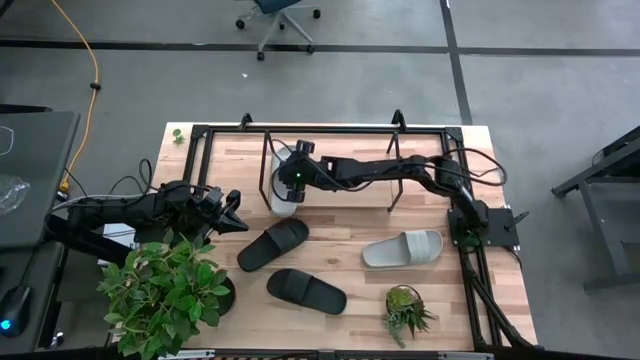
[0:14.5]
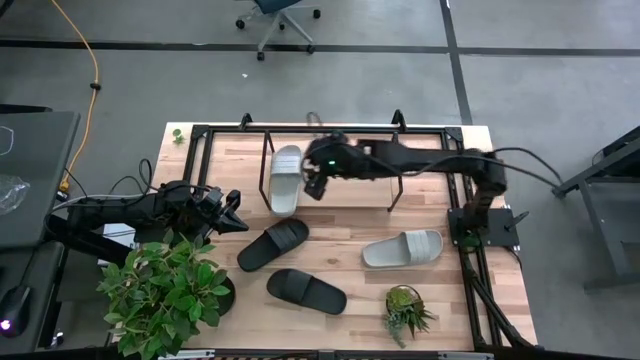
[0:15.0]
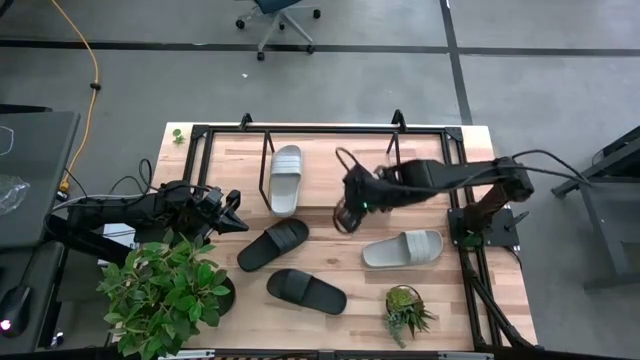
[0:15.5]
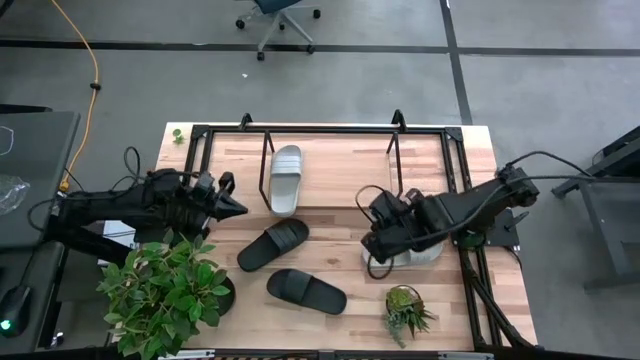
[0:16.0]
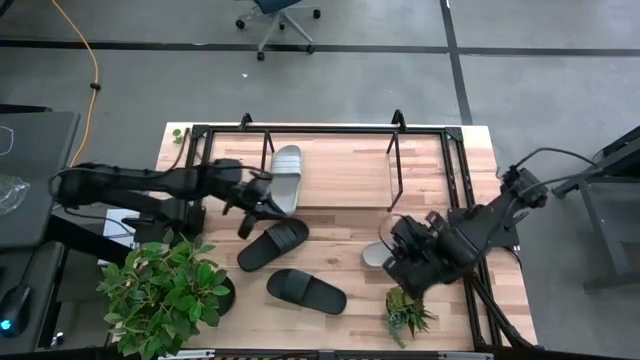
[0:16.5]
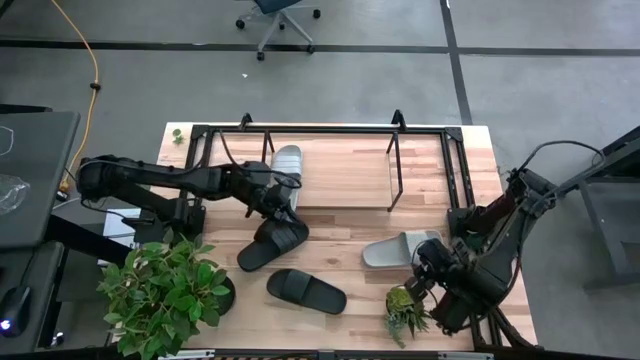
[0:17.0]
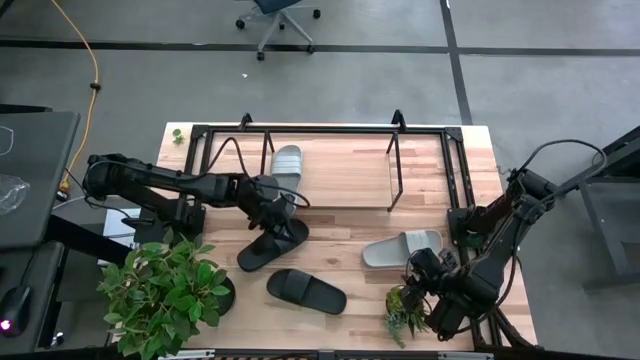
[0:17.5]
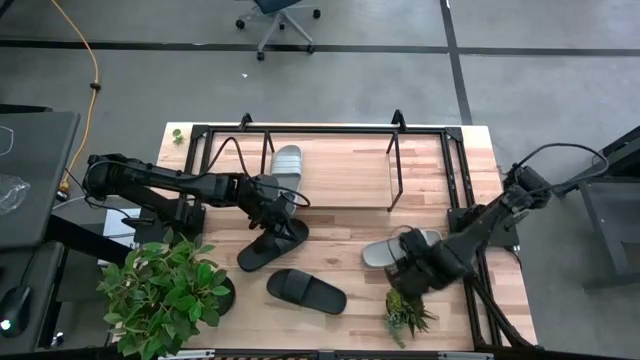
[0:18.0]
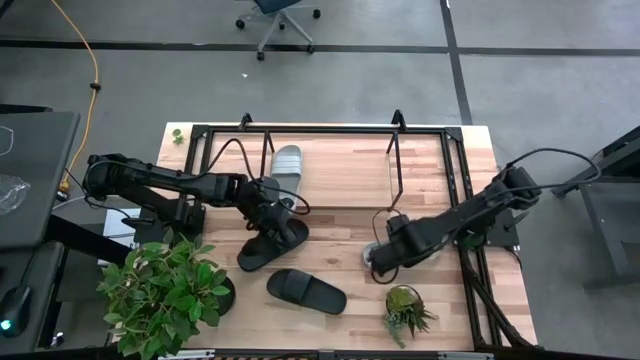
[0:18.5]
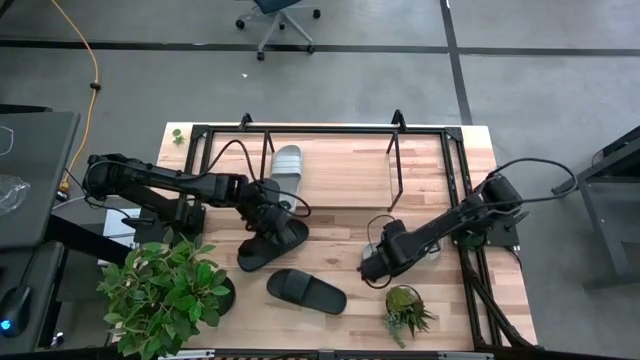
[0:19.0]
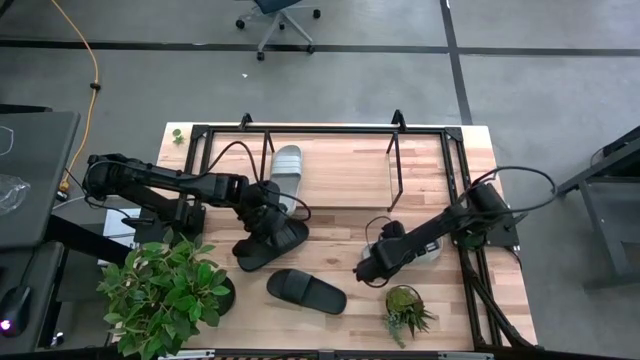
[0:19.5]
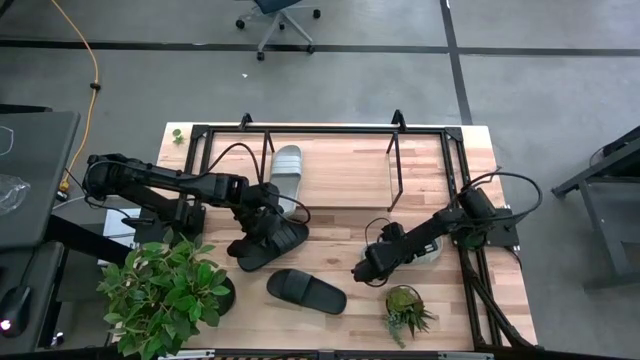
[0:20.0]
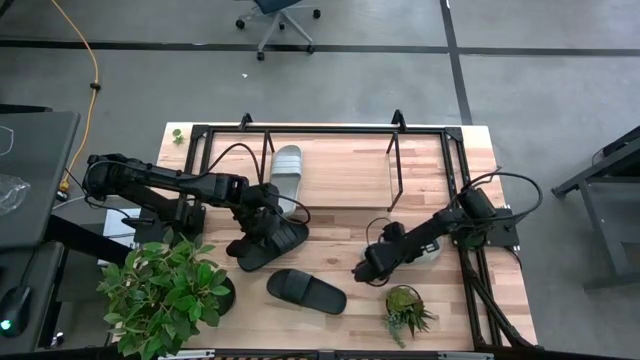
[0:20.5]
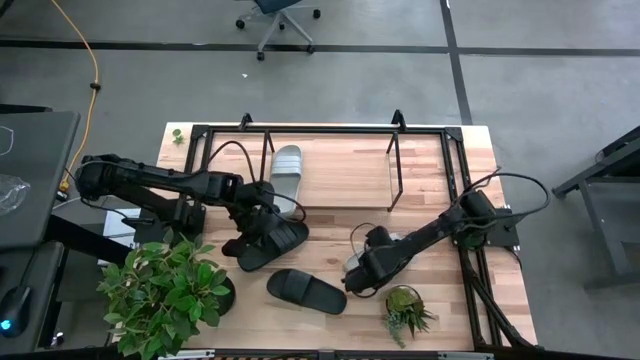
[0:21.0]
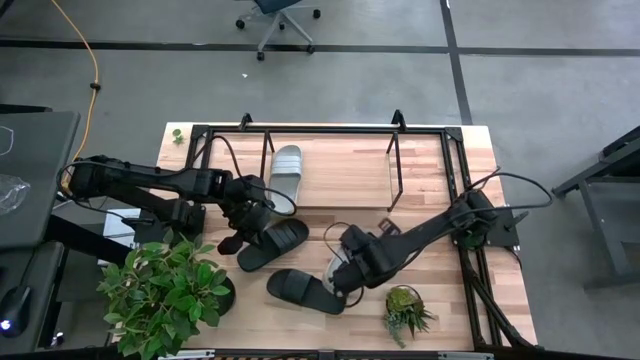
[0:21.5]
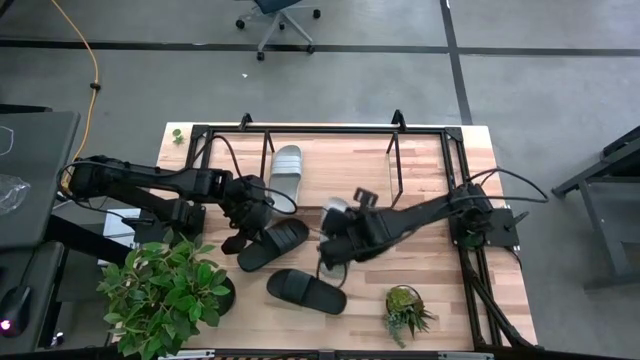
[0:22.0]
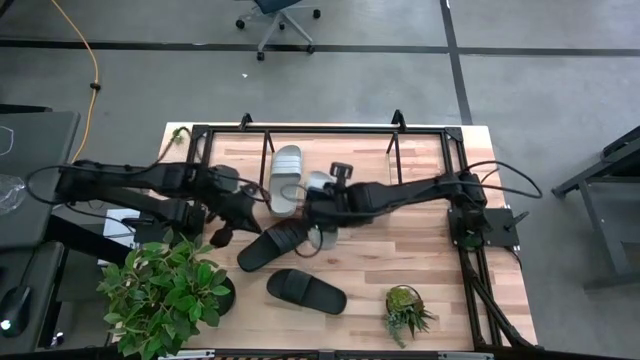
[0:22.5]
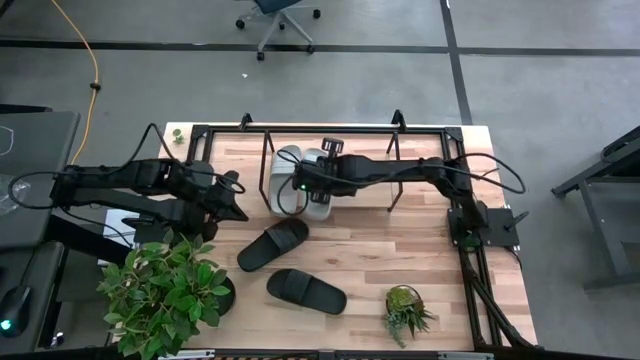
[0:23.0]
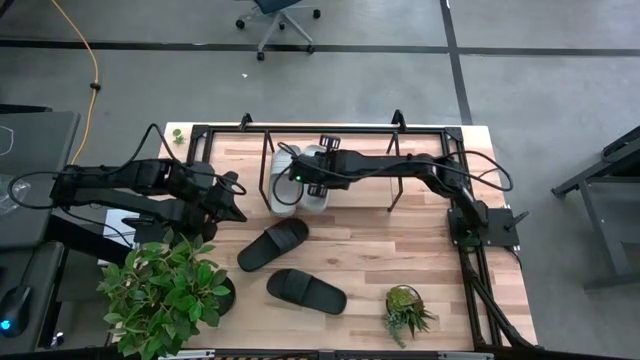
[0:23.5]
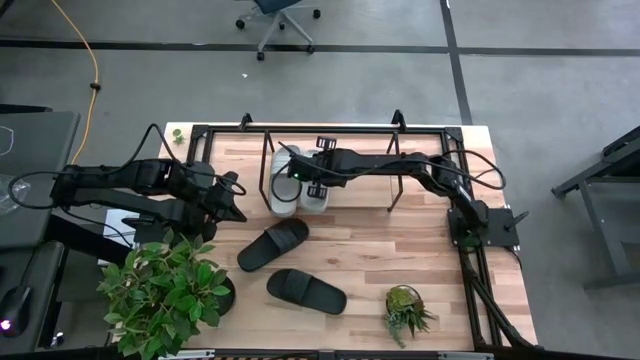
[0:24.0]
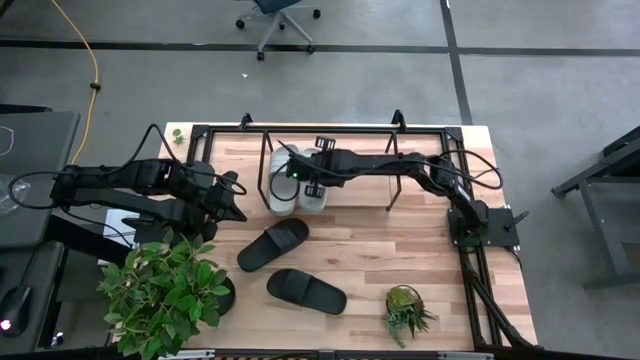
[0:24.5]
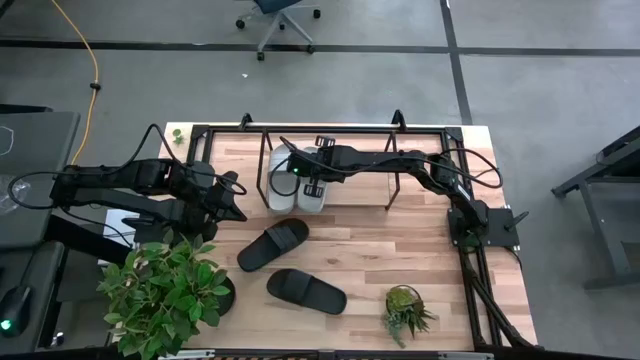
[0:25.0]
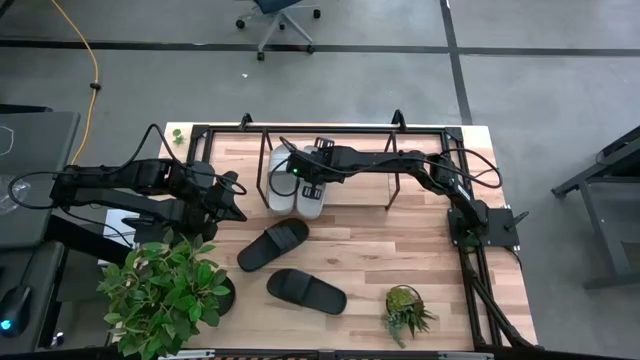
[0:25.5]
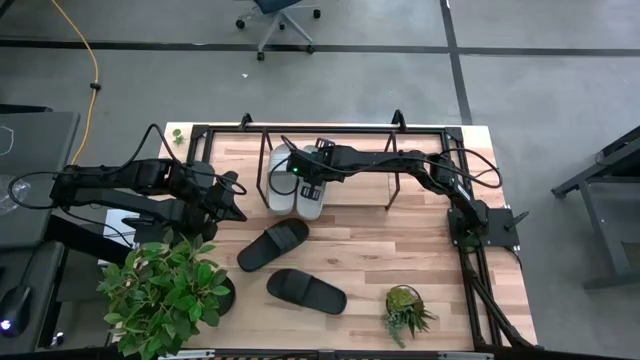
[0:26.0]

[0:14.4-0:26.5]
Task: Pick and place slides into the shelf
Put the gray slide on the shelf

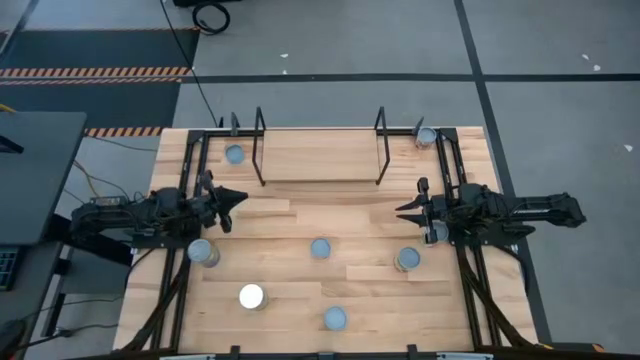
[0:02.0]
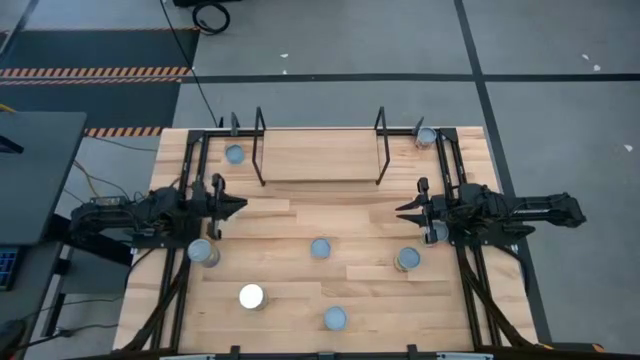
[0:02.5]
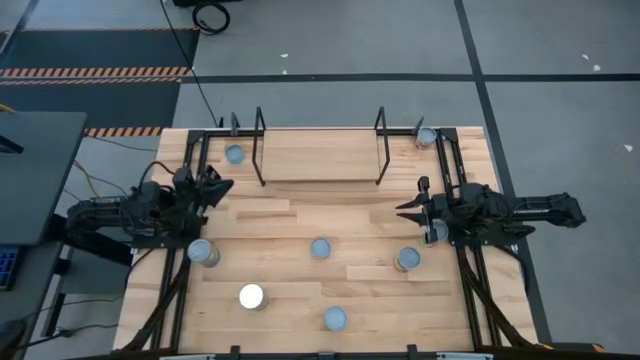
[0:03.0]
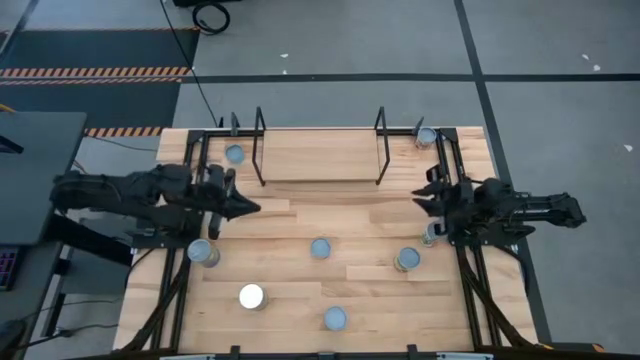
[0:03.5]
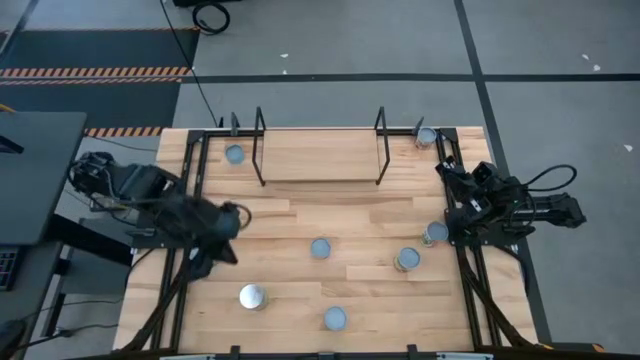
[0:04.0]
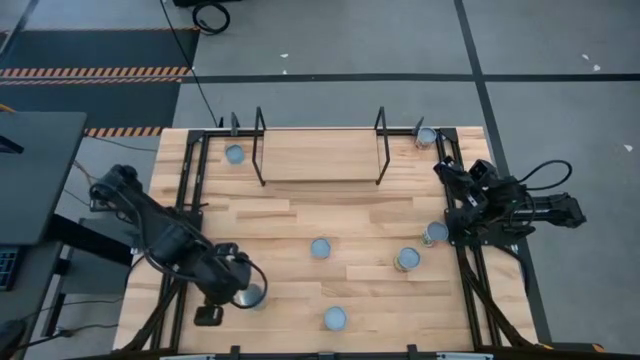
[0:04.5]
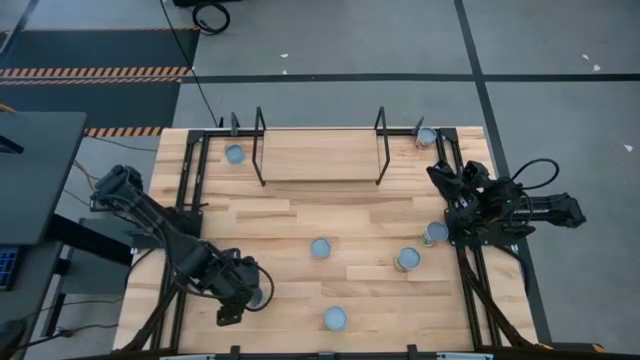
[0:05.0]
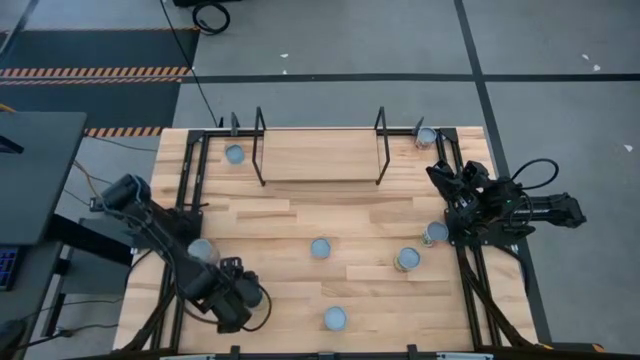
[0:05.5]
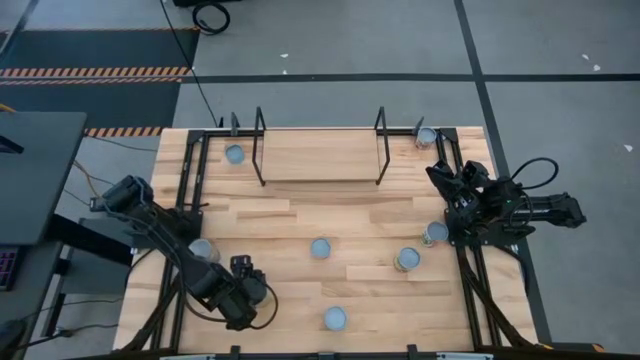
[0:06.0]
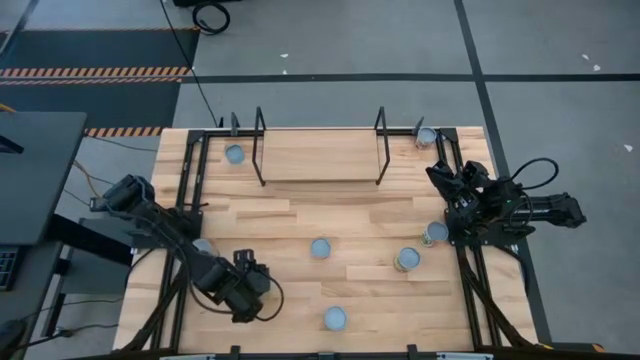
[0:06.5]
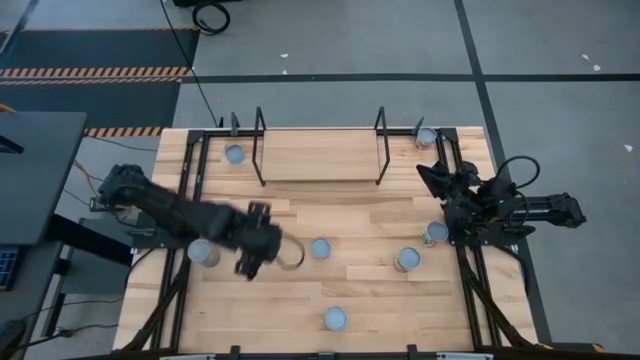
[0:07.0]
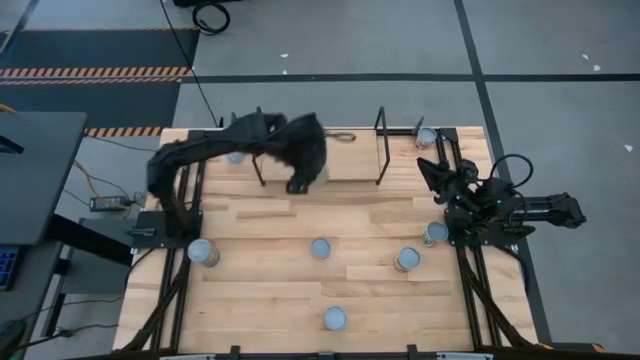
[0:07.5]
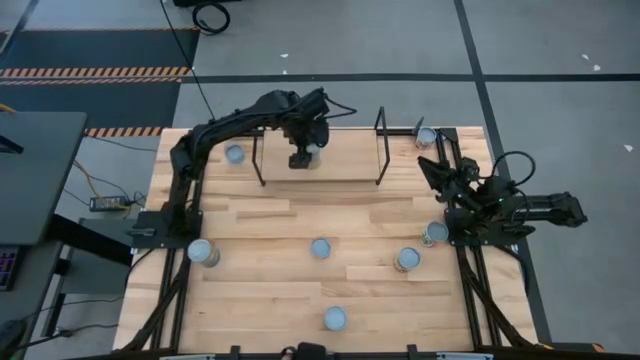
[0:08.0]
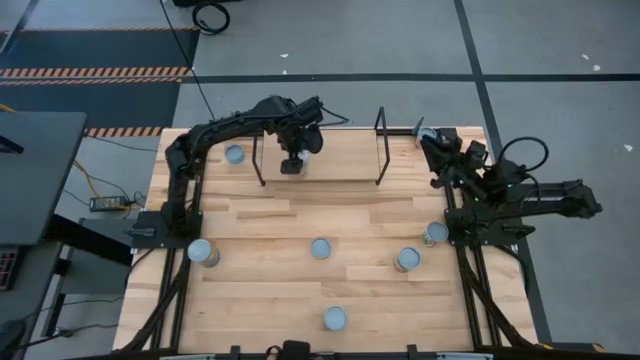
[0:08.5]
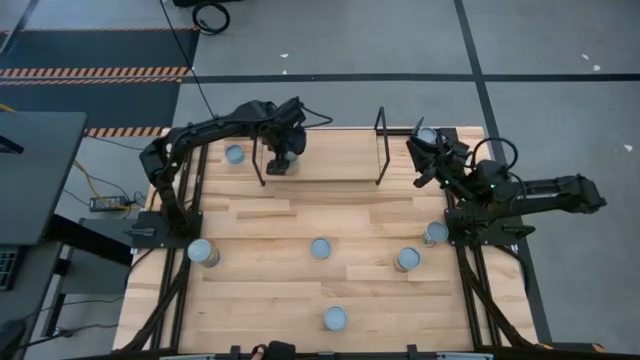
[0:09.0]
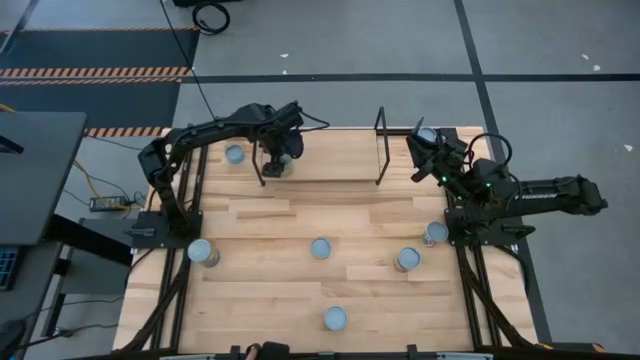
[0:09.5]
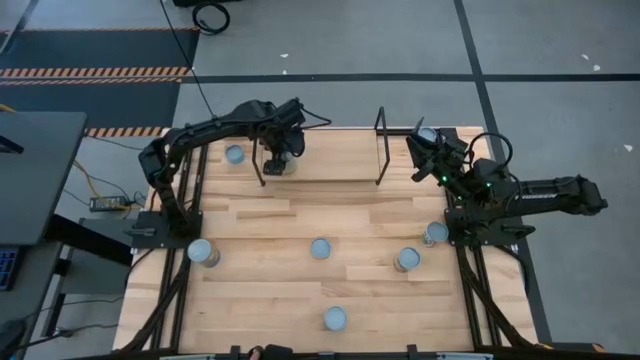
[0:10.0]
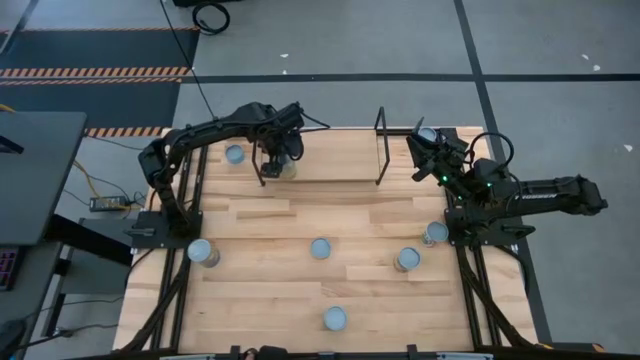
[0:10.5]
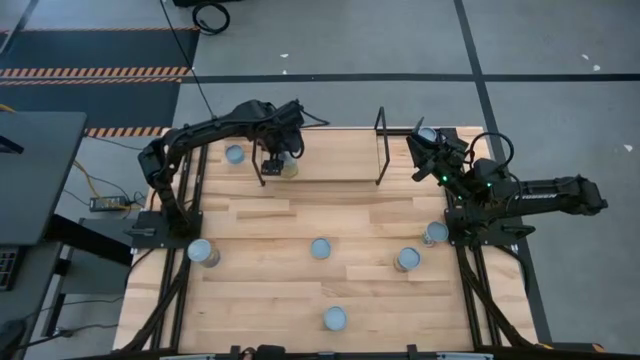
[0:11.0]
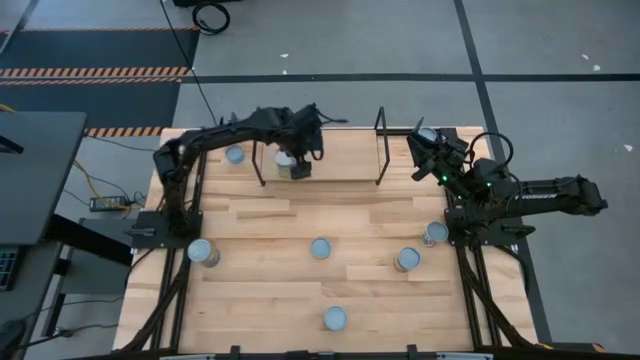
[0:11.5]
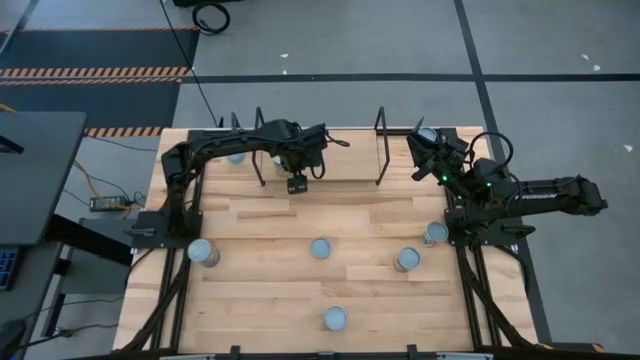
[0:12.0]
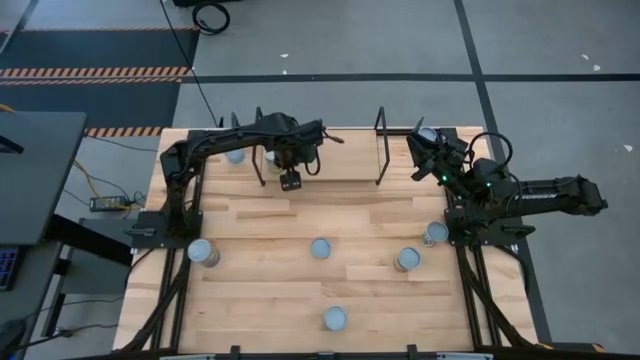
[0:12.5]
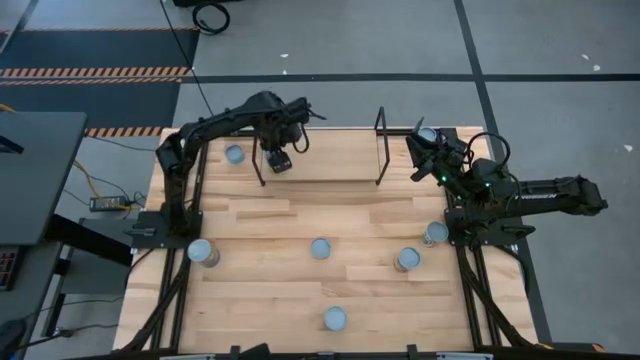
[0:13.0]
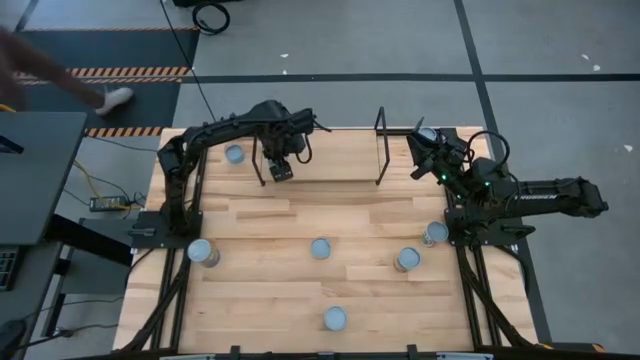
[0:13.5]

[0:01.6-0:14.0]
Task: Pick and place cans onto a shelf
Put the light orange can on the shelf
